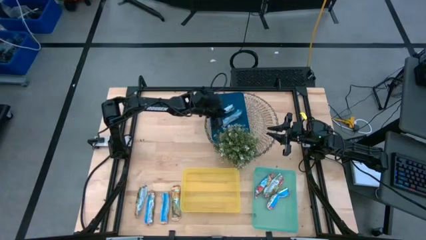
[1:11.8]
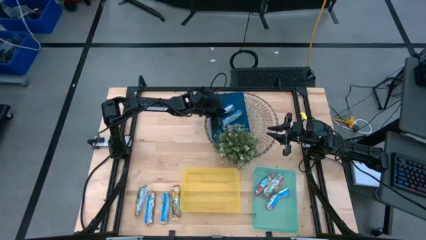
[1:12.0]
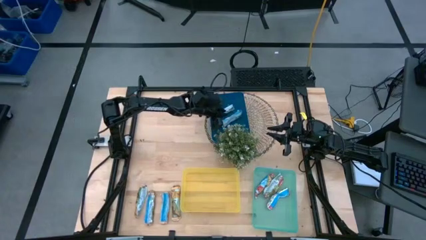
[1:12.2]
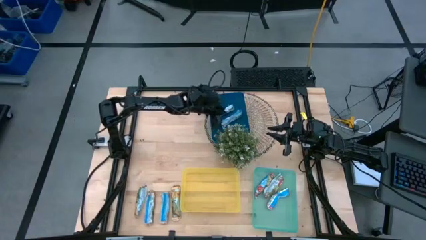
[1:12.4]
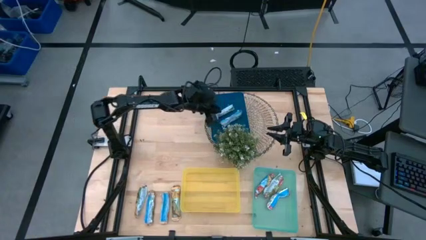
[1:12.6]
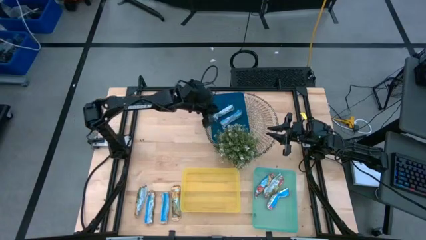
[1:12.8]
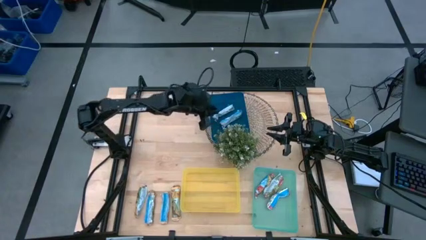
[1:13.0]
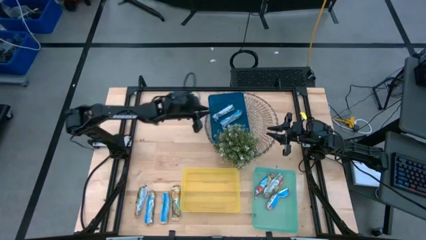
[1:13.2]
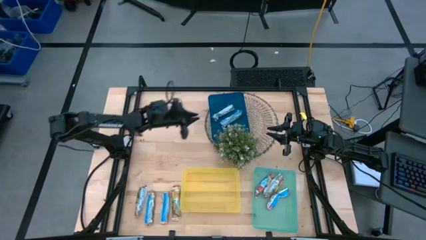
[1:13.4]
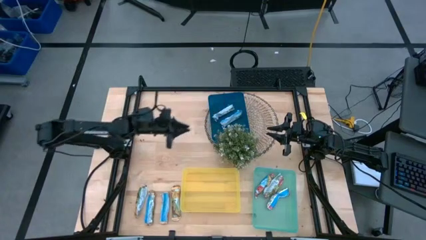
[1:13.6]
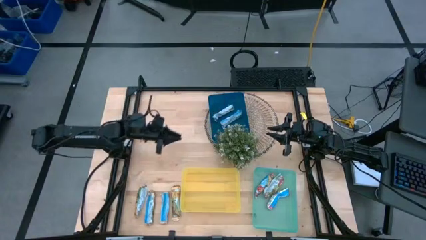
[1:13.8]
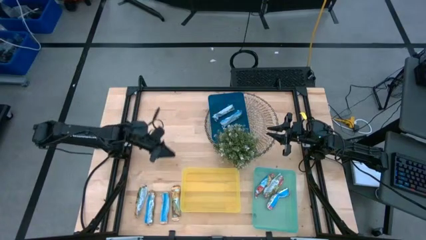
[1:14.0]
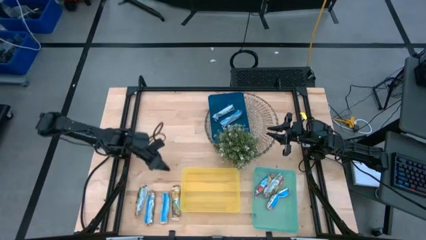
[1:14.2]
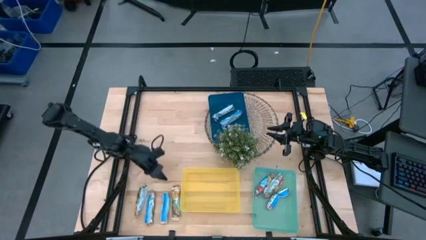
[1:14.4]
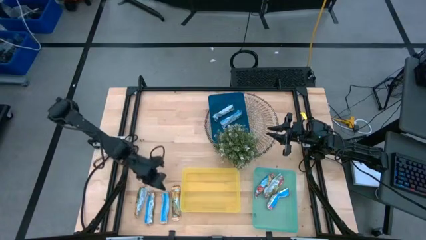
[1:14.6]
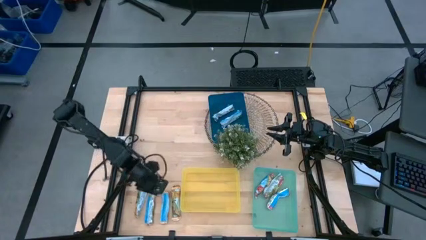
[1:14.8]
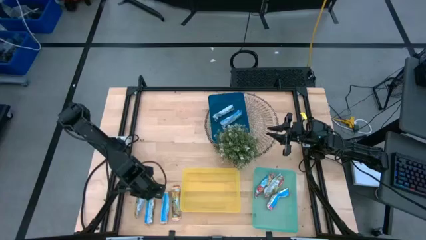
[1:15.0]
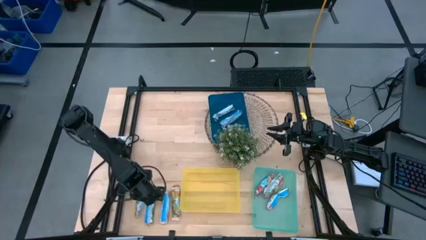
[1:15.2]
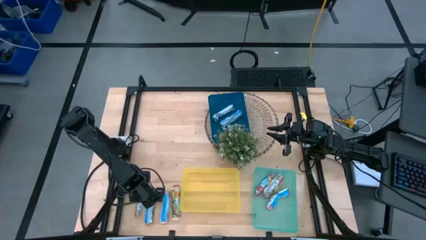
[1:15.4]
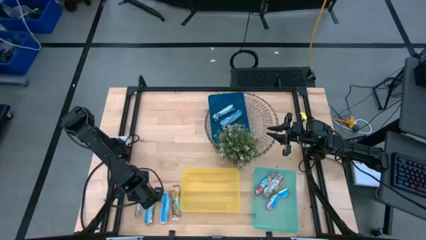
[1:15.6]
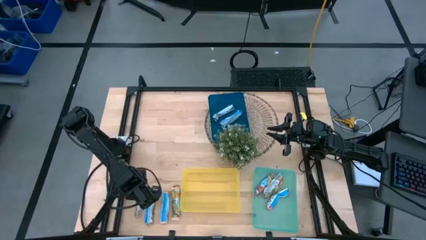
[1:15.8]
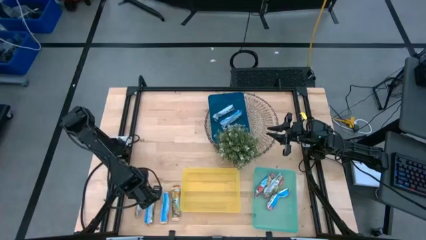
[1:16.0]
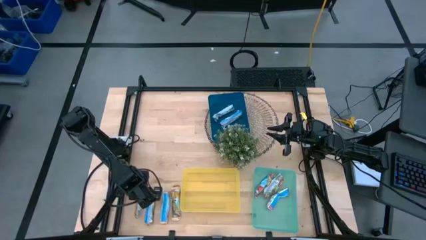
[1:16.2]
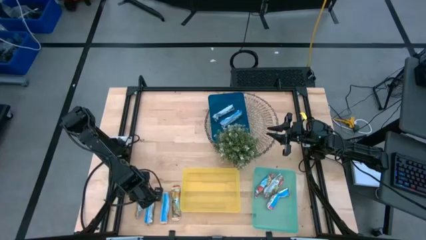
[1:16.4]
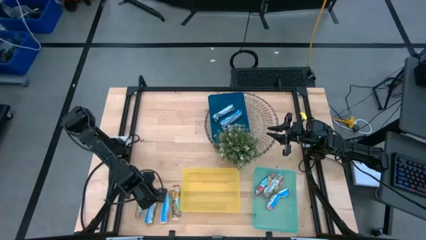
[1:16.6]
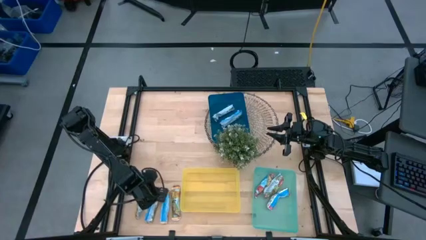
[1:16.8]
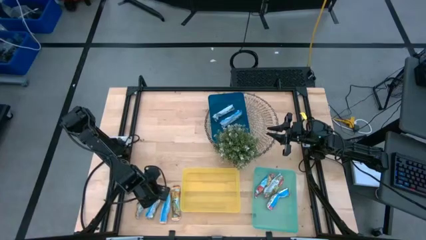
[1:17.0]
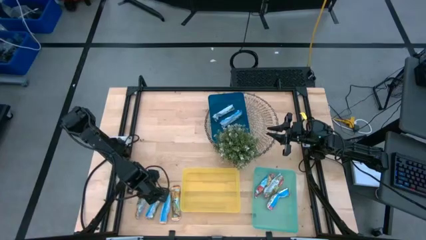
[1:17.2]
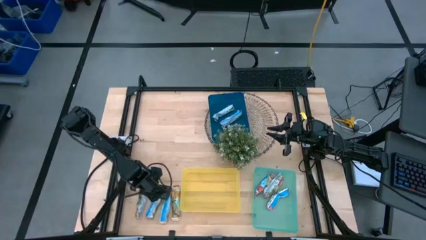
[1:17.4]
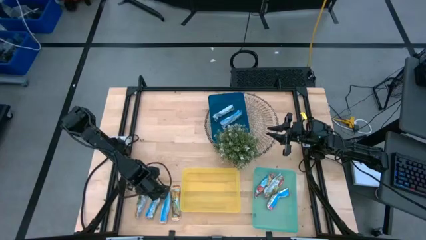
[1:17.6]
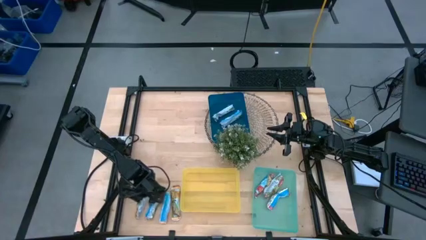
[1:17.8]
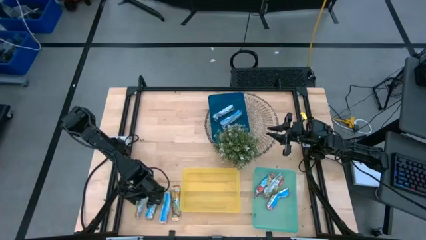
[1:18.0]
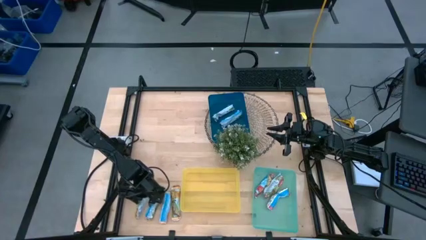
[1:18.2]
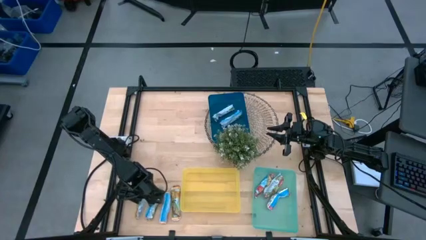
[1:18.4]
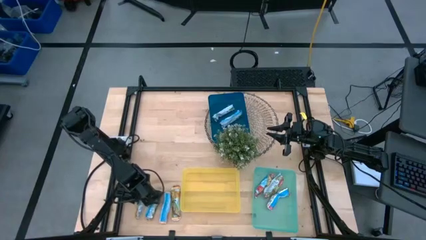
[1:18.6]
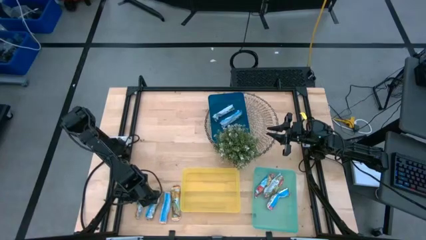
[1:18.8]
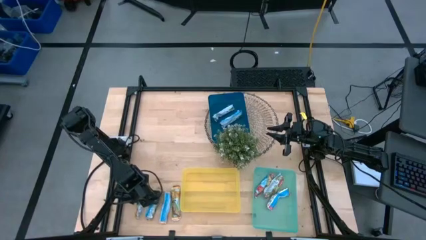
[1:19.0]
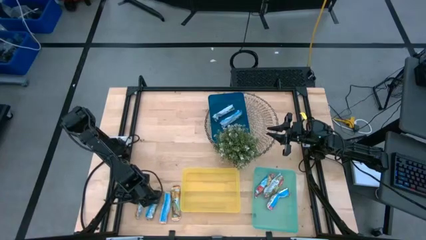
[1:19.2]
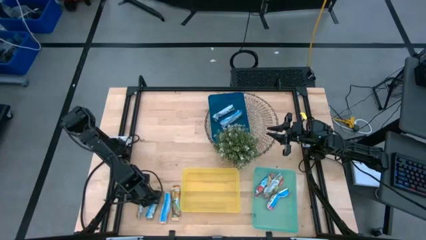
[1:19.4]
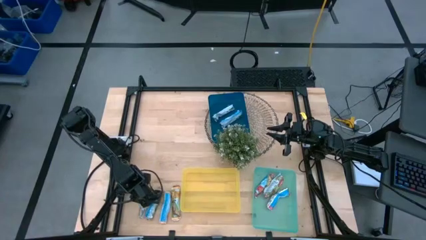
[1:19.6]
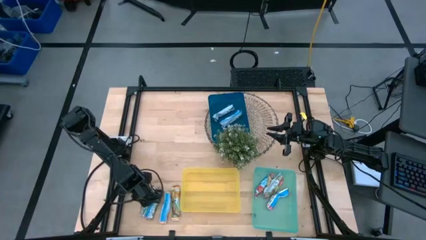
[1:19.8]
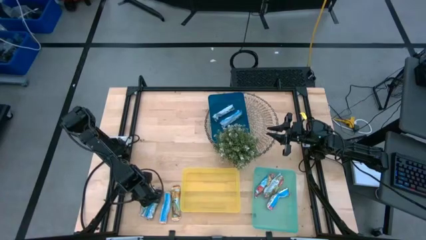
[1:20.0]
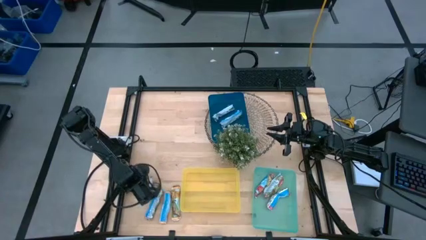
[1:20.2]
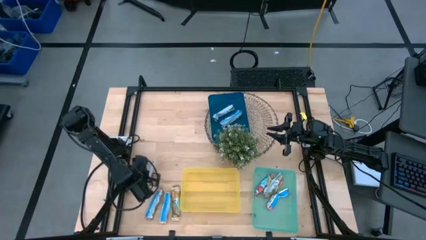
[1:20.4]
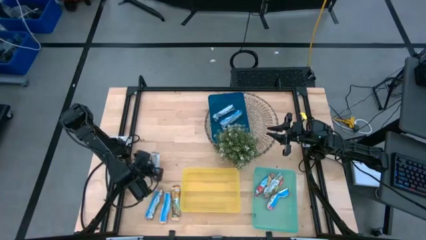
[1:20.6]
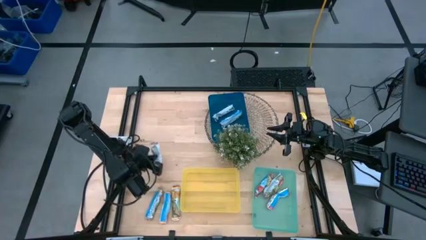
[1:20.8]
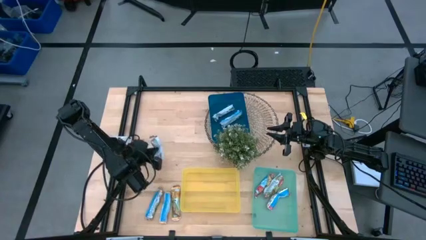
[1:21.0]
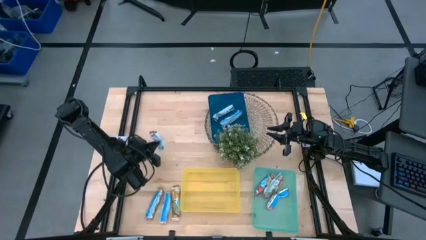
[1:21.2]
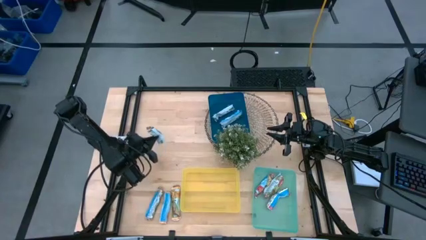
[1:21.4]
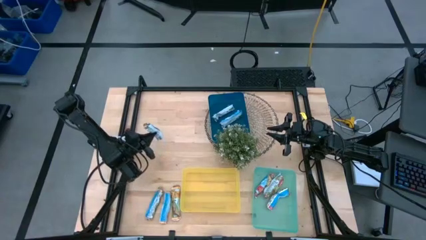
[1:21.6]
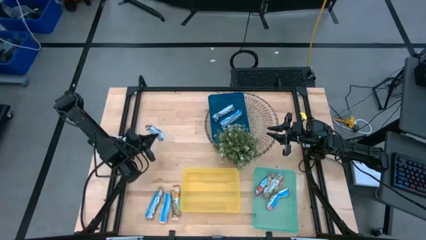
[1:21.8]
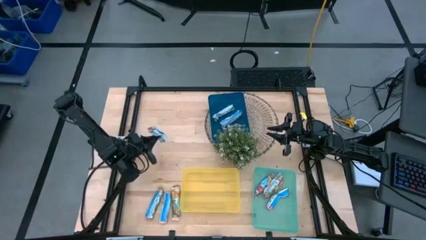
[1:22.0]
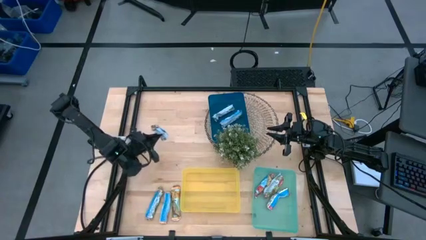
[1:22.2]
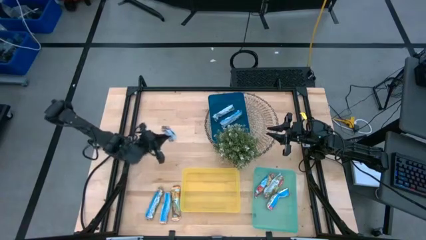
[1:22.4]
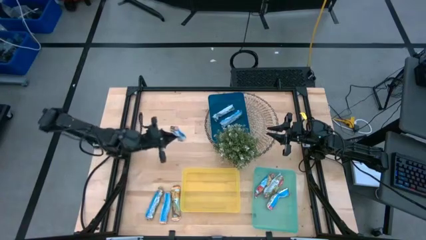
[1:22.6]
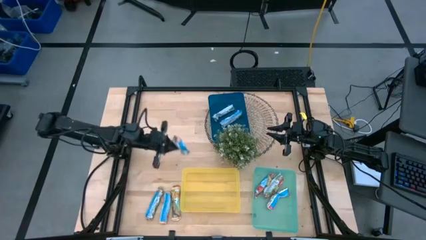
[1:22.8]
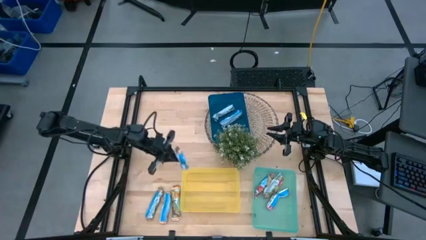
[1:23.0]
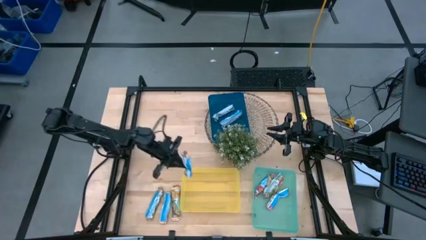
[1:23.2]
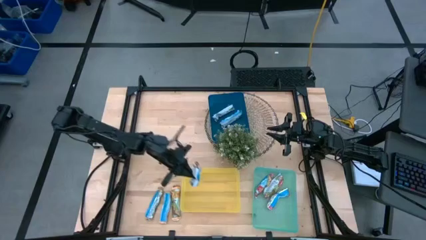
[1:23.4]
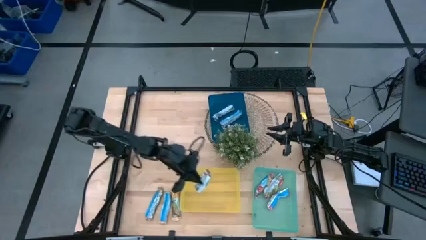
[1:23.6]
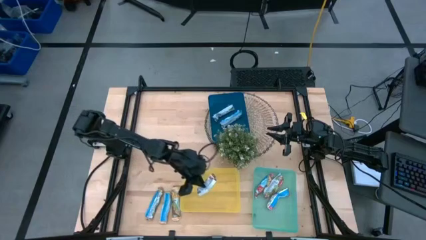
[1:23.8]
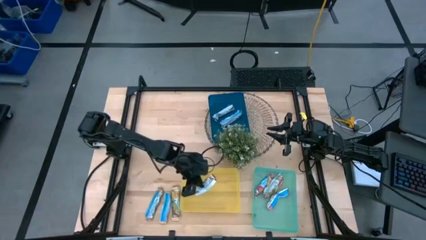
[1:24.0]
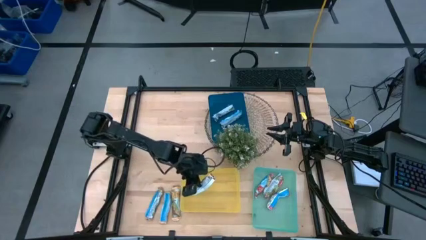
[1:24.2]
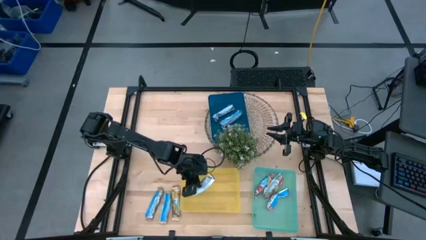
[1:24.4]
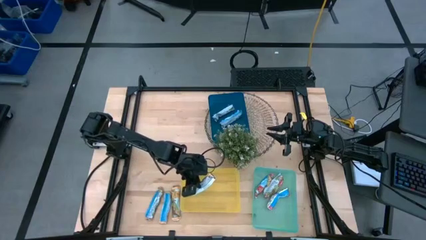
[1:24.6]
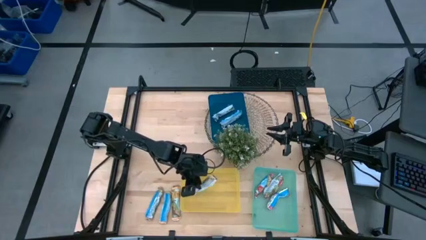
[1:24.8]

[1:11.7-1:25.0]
Task: Pick and place Granola Bars by type
Put the yellow granola bar into the yellow bin
